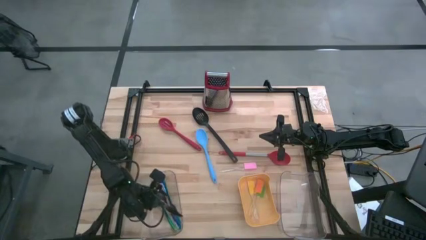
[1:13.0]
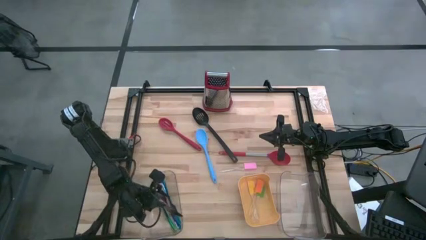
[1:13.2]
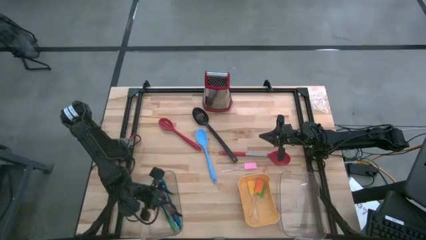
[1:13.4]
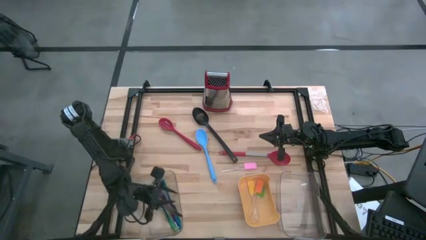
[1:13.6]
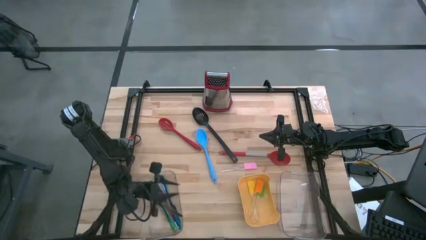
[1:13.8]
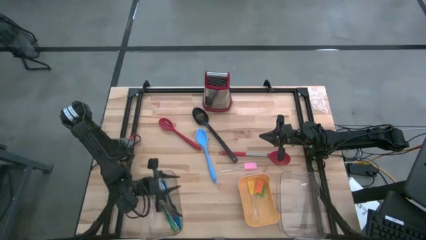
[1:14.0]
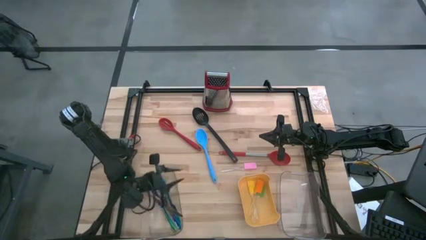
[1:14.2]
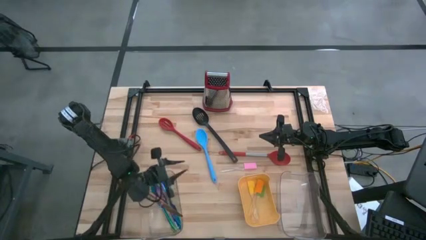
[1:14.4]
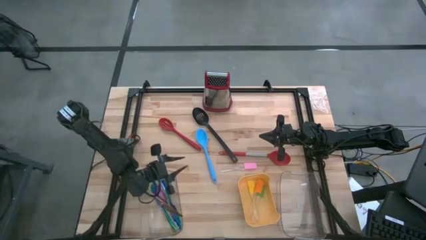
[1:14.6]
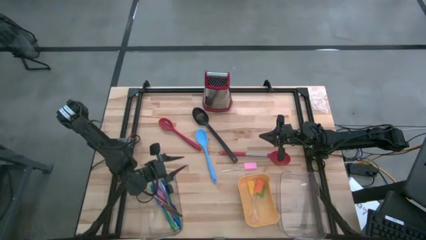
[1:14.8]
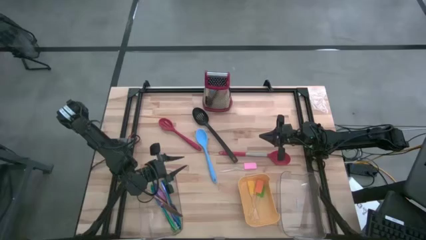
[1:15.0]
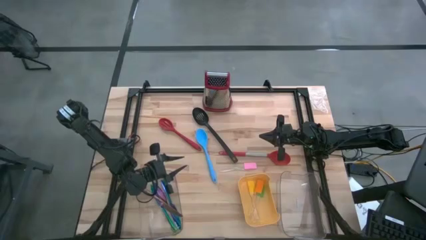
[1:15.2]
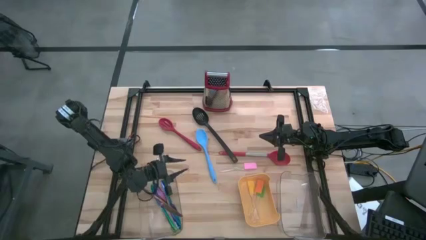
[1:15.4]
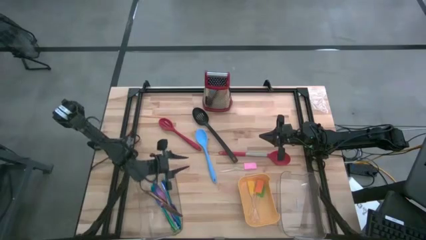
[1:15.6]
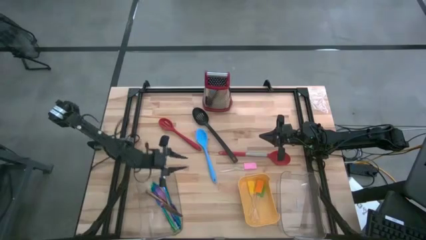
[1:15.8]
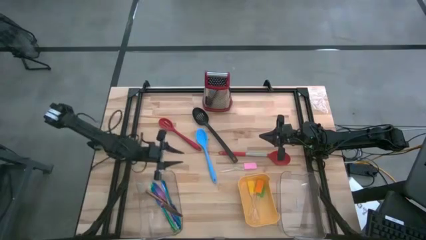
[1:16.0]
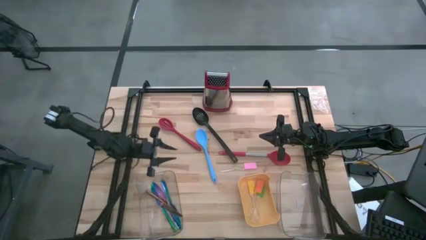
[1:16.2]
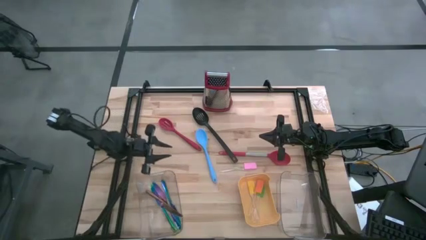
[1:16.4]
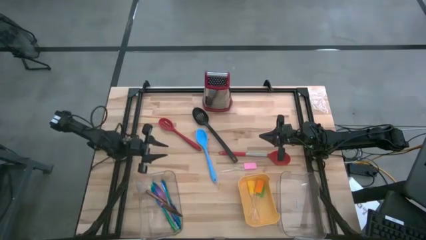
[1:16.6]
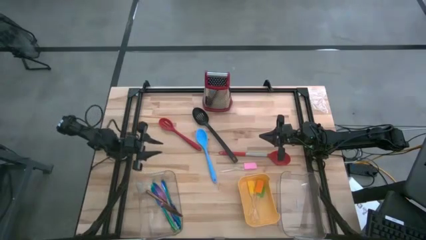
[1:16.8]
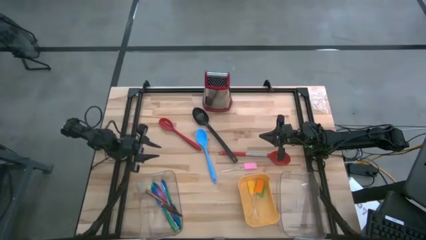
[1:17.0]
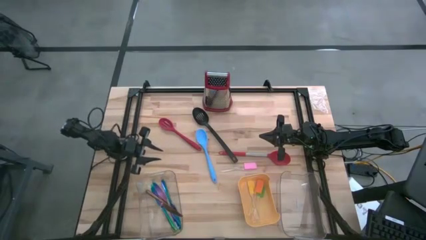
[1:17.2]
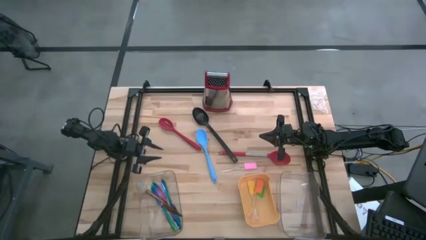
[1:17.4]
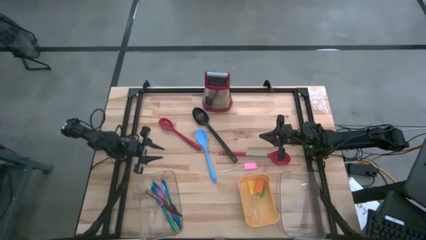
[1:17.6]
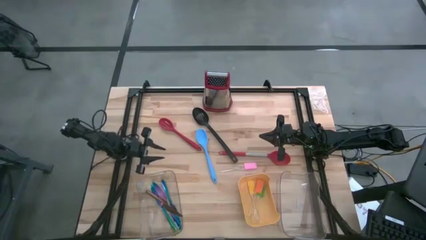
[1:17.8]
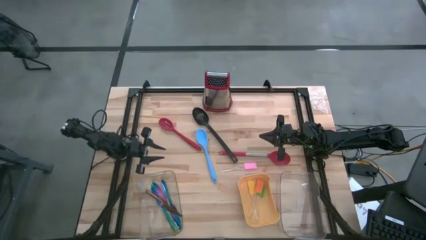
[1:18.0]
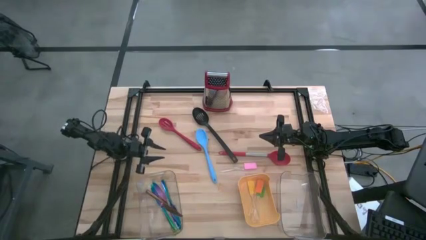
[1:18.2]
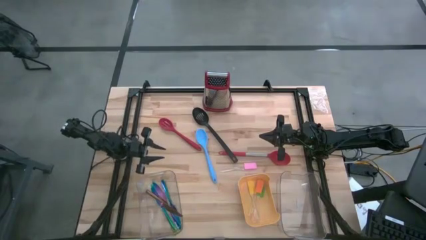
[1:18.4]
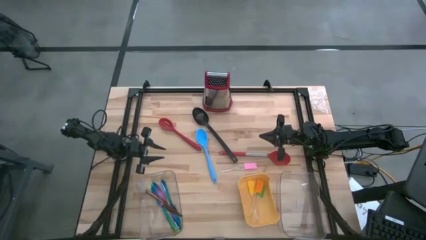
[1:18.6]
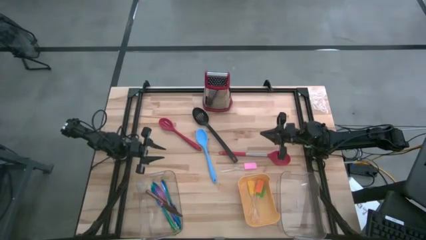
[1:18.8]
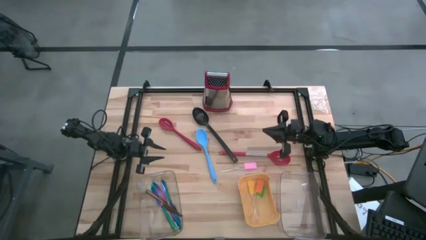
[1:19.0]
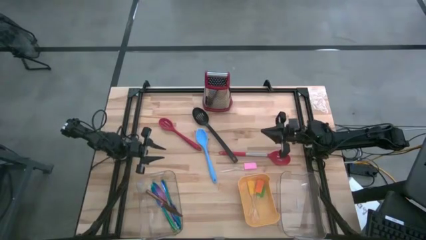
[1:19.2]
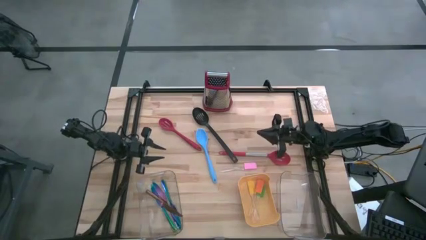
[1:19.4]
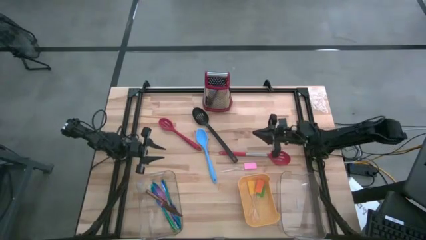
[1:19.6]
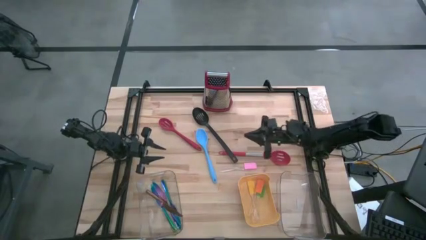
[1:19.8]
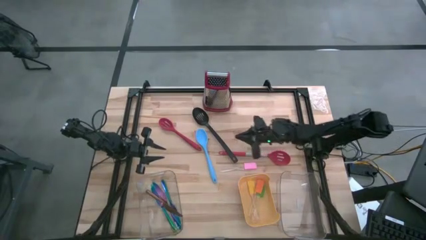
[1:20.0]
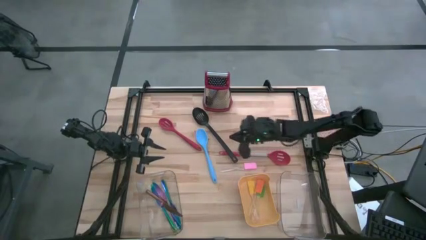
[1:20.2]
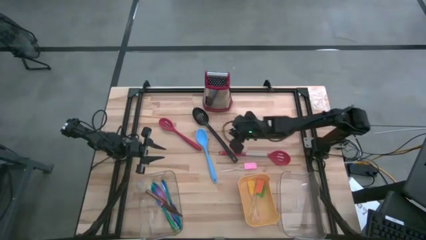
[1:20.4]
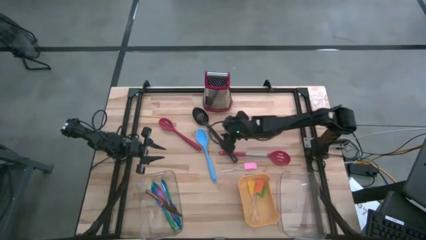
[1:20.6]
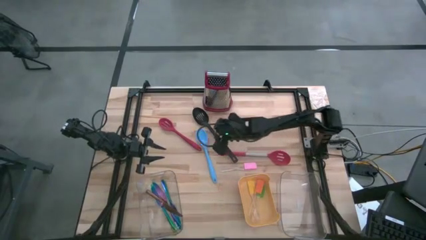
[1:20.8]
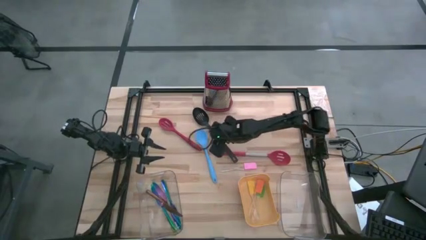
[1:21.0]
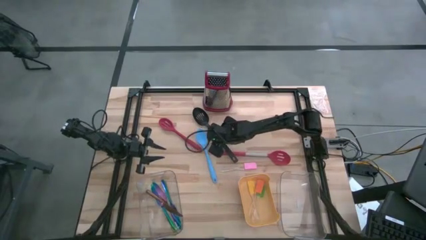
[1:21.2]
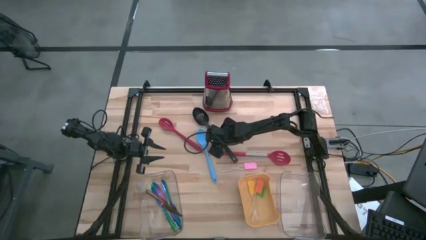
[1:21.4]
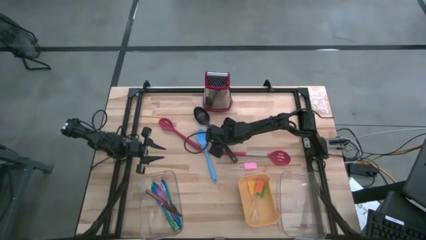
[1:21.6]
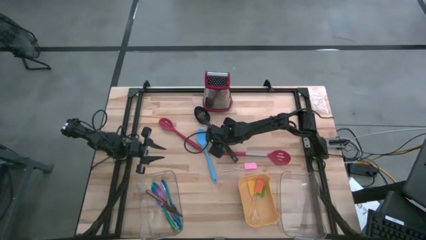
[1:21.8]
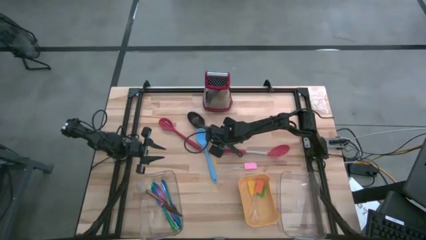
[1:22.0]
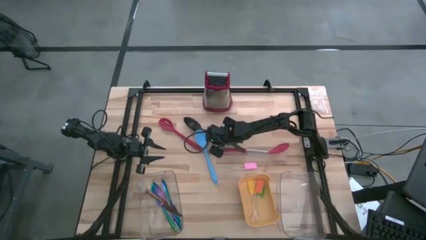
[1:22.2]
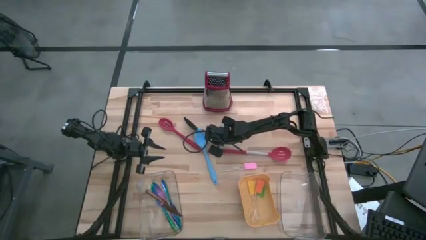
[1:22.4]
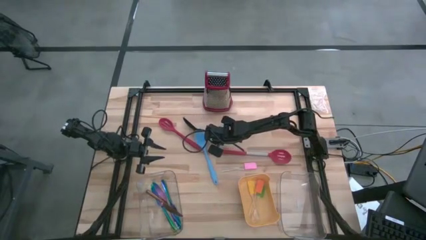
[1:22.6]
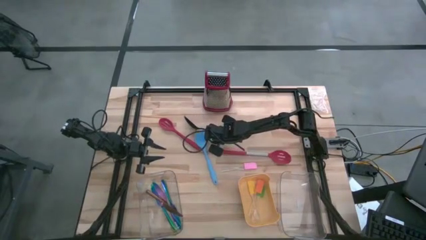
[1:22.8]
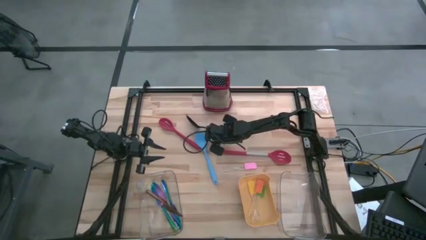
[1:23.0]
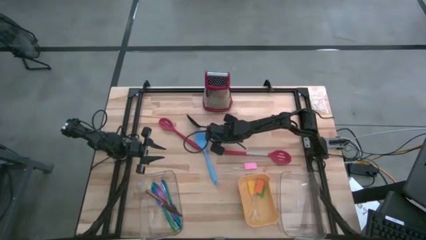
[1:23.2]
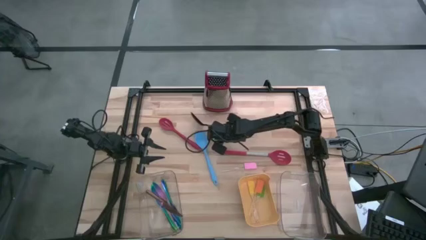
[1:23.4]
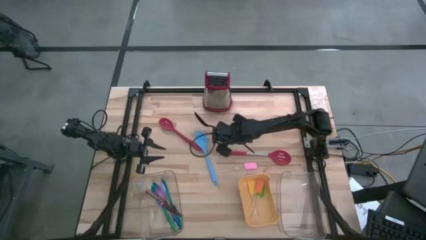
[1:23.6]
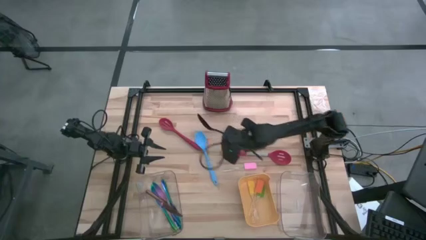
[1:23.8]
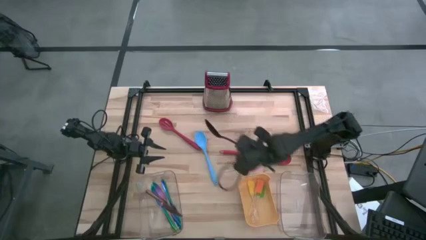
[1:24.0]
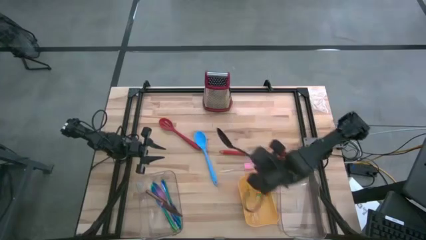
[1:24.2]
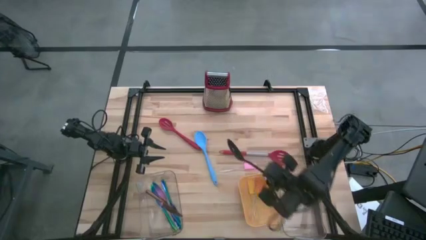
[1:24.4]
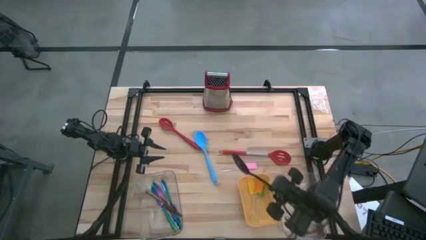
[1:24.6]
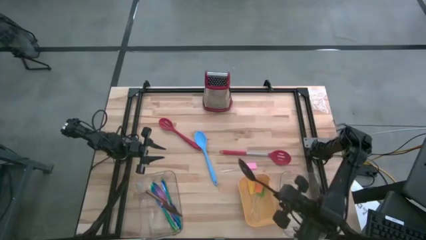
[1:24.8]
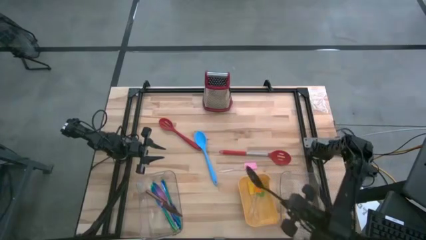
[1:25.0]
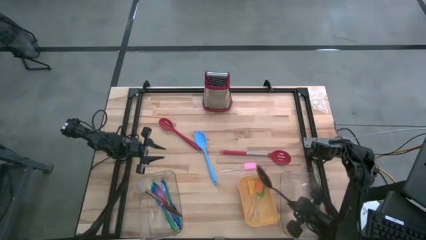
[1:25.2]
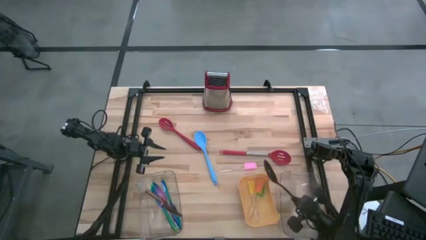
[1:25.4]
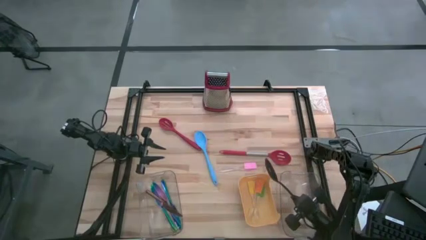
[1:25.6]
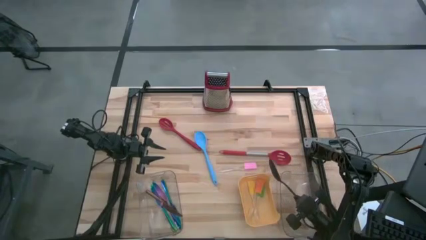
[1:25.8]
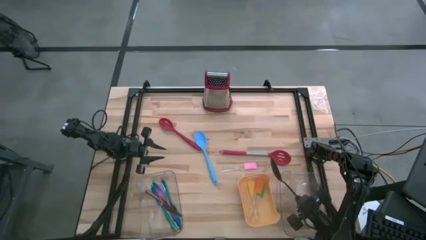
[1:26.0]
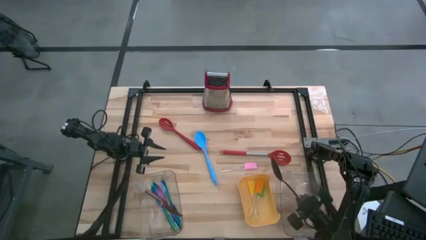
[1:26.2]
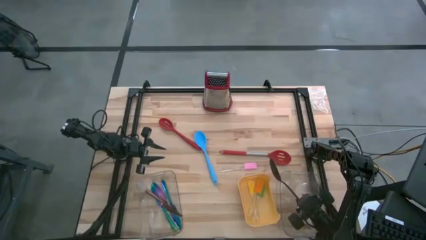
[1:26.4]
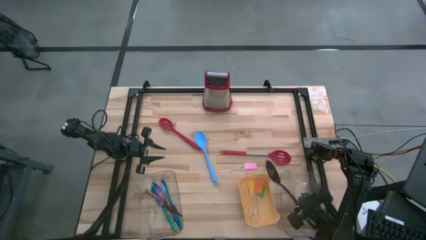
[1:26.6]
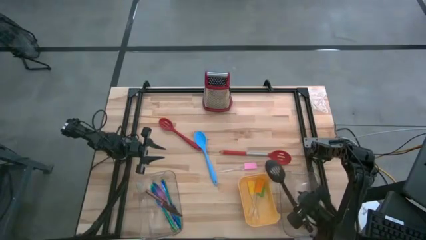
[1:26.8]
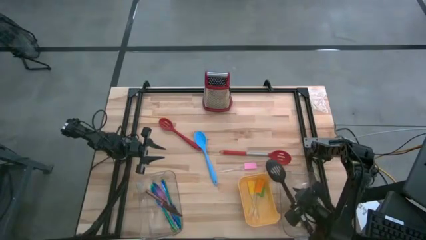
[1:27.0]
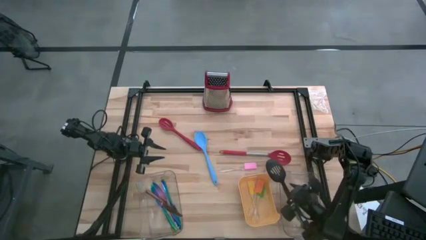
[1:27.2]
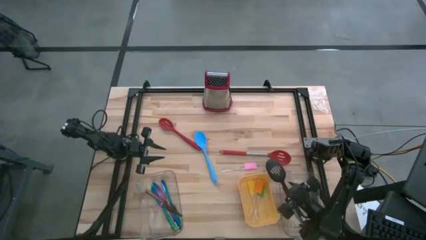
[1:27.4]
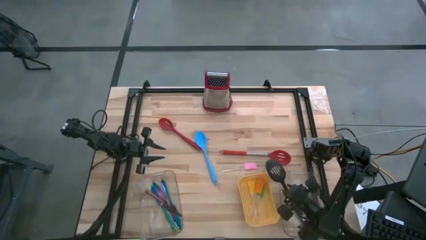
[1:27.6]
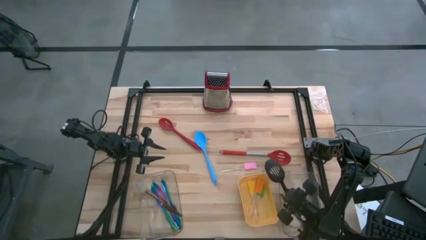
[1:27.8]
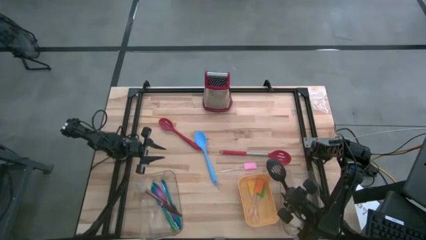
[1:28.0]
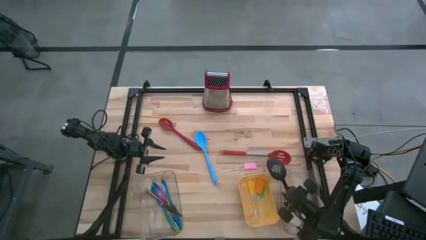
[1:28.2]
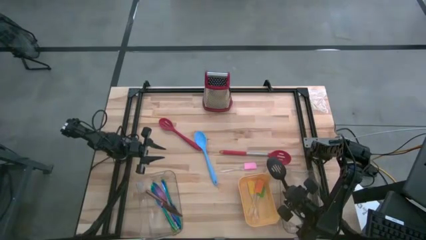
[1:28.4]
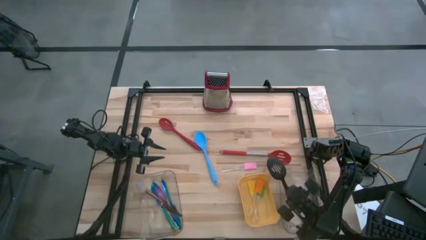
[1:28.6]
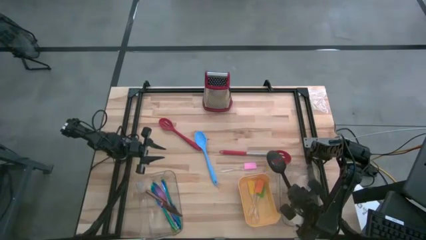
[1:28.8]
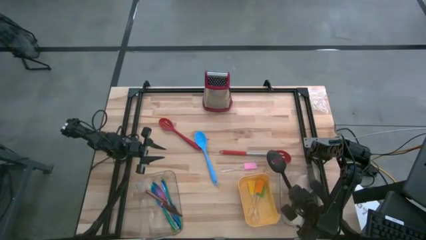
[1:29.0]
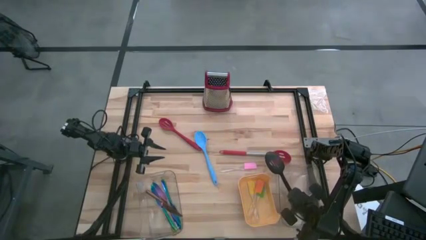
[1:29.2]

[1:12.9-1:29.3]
Task: Pick & Place Kitchen Items
Put the black serving spoon into the right transparent bin
